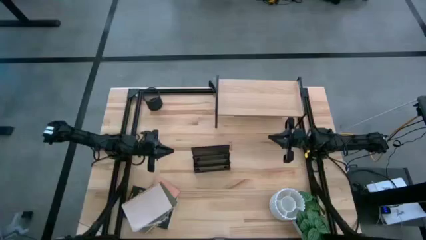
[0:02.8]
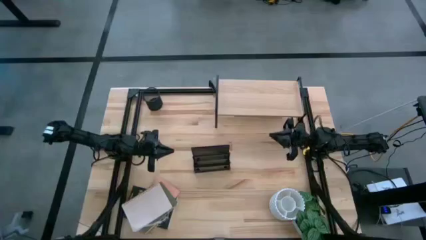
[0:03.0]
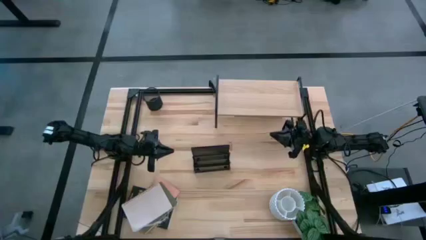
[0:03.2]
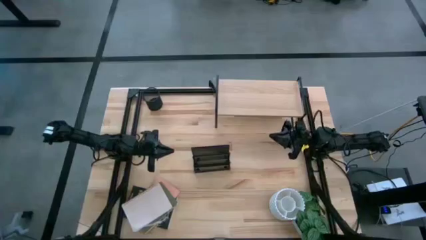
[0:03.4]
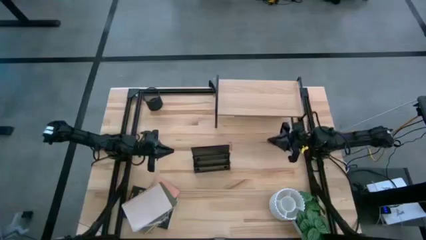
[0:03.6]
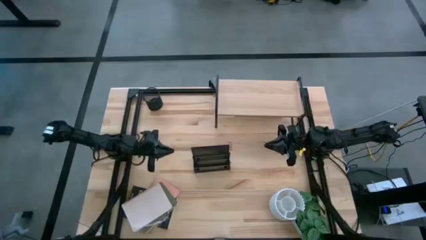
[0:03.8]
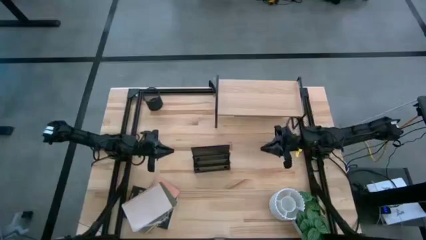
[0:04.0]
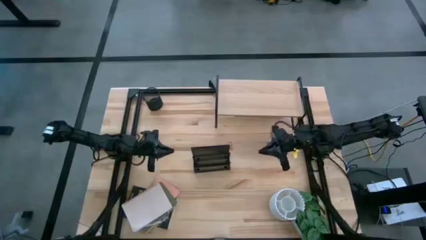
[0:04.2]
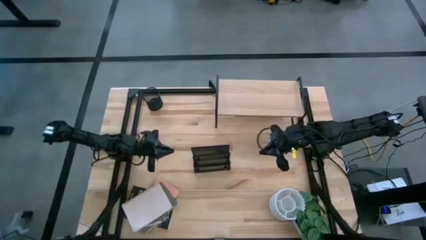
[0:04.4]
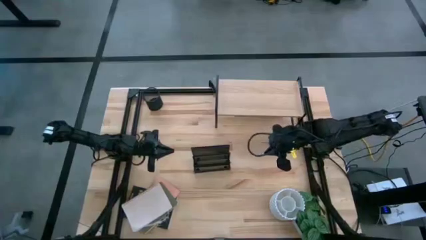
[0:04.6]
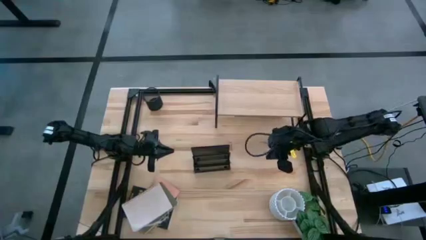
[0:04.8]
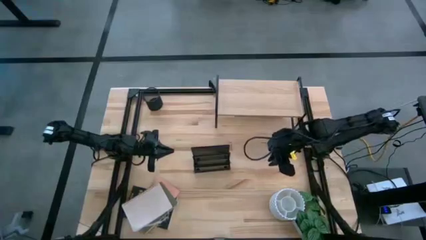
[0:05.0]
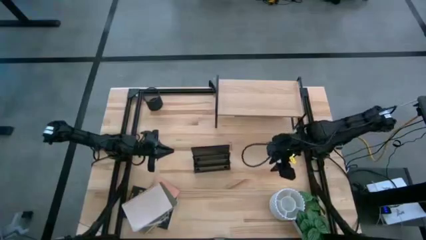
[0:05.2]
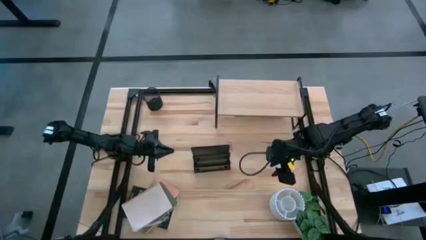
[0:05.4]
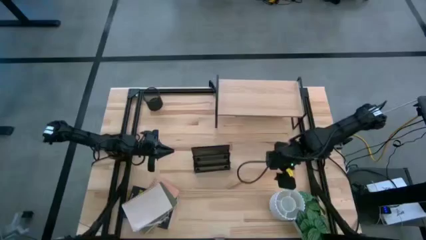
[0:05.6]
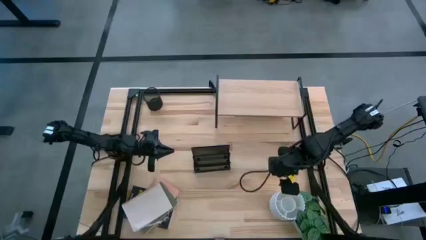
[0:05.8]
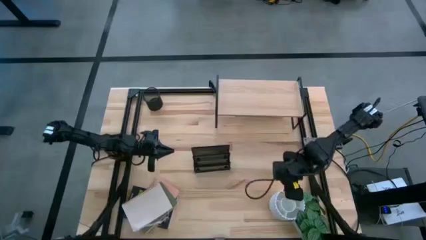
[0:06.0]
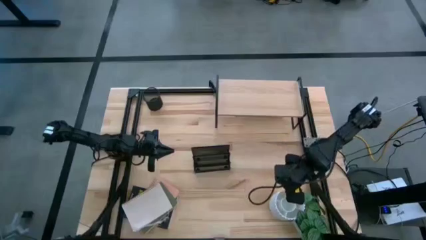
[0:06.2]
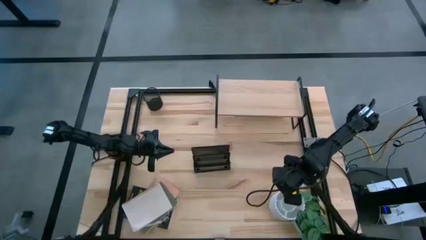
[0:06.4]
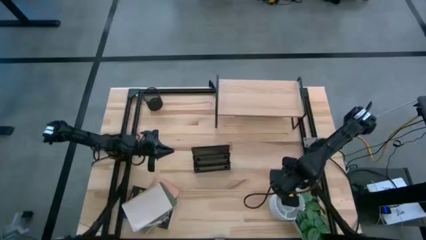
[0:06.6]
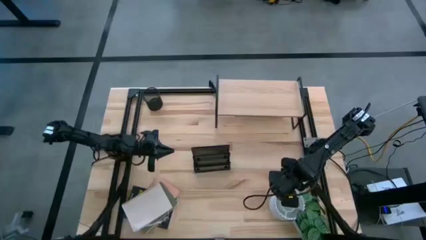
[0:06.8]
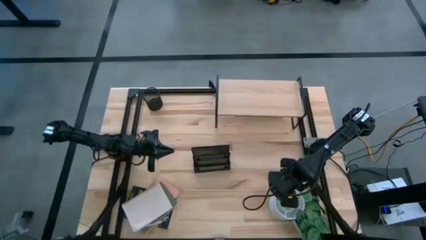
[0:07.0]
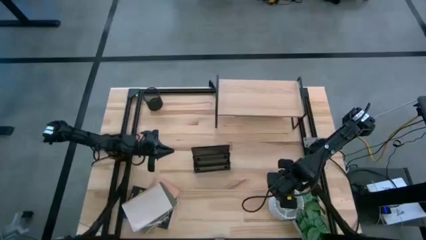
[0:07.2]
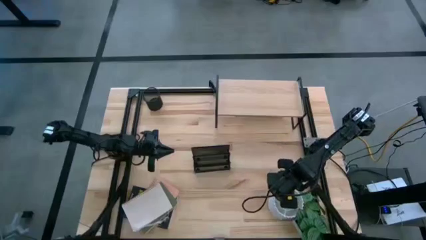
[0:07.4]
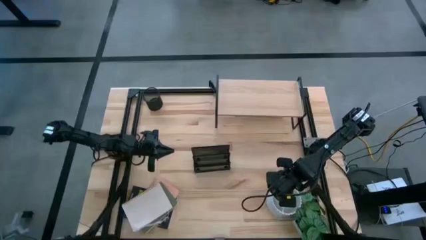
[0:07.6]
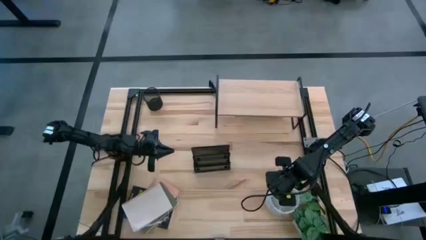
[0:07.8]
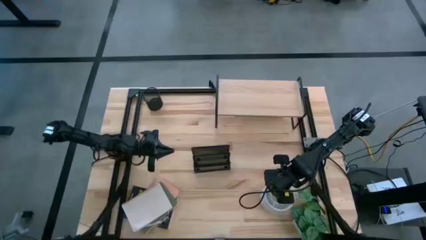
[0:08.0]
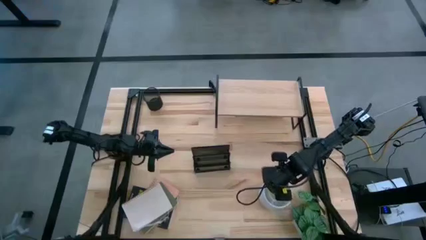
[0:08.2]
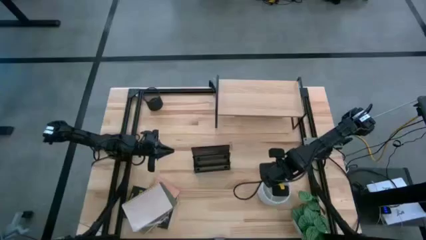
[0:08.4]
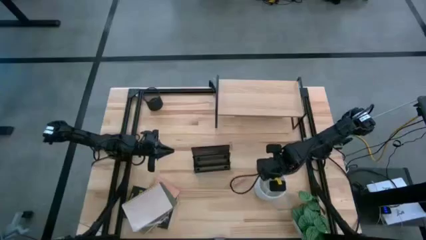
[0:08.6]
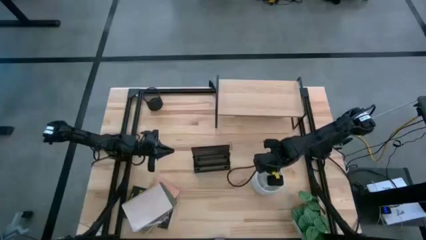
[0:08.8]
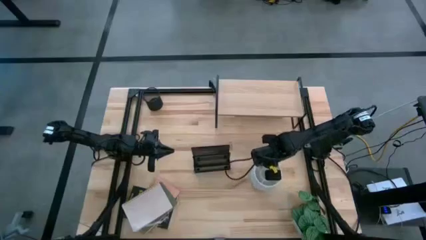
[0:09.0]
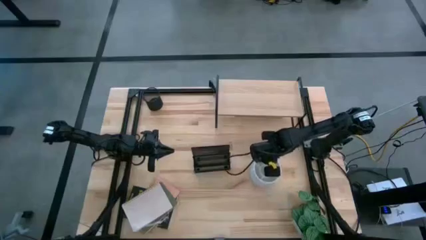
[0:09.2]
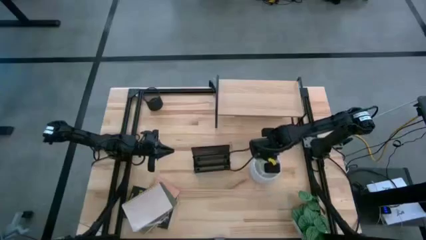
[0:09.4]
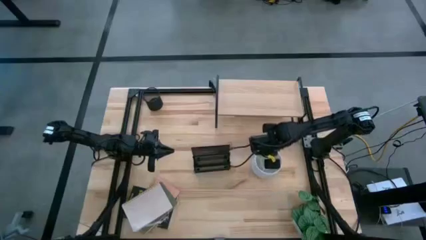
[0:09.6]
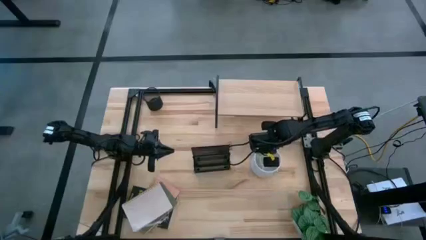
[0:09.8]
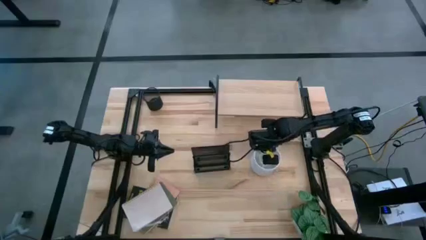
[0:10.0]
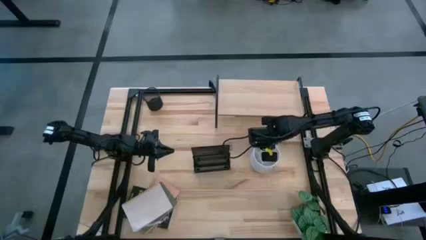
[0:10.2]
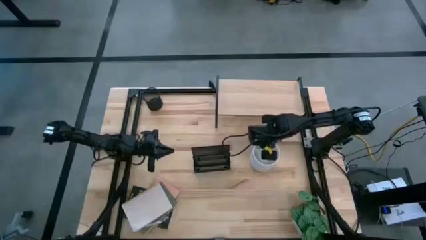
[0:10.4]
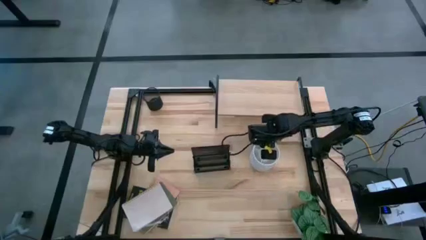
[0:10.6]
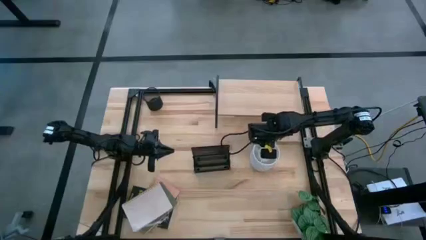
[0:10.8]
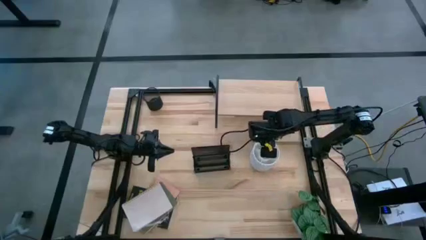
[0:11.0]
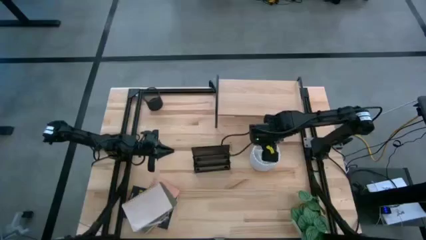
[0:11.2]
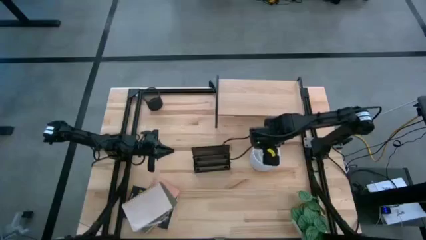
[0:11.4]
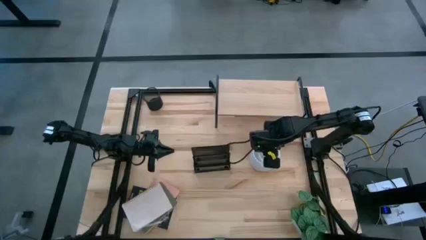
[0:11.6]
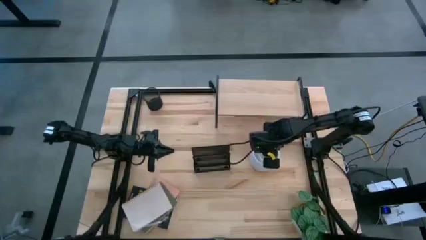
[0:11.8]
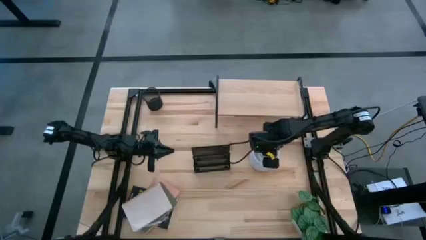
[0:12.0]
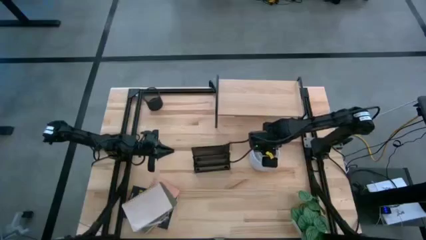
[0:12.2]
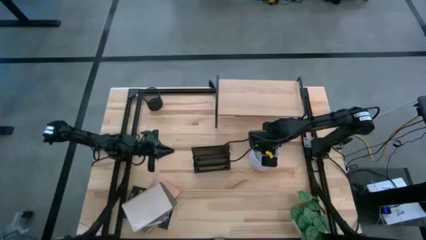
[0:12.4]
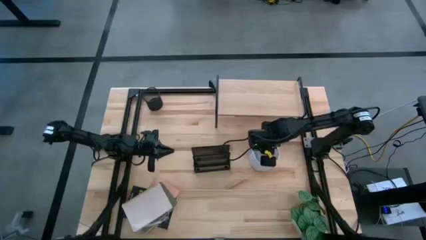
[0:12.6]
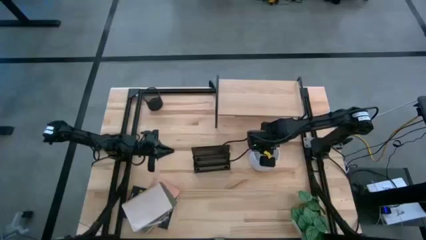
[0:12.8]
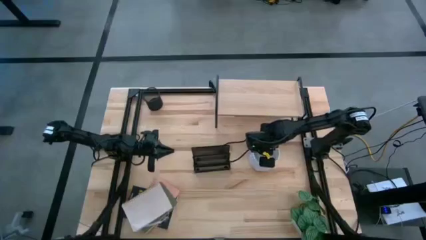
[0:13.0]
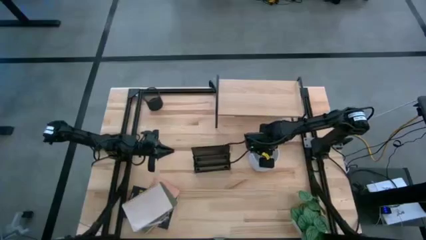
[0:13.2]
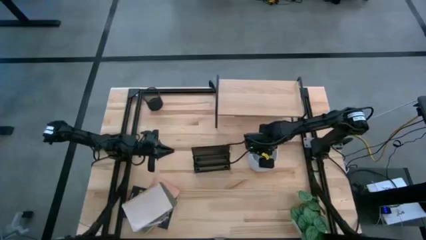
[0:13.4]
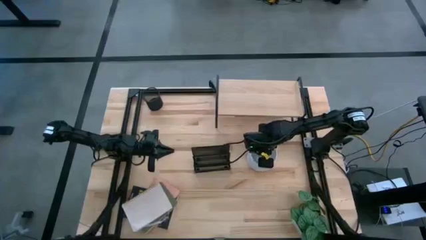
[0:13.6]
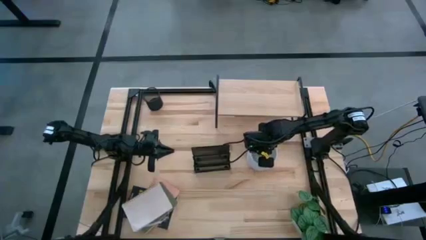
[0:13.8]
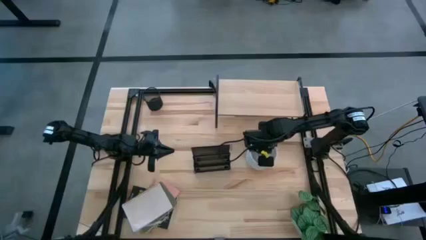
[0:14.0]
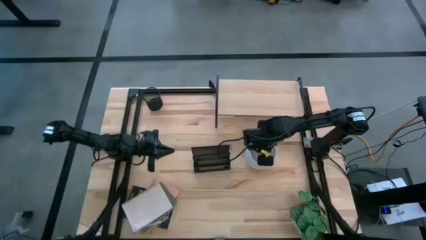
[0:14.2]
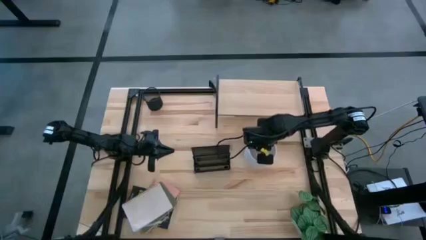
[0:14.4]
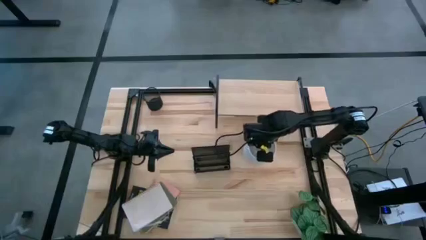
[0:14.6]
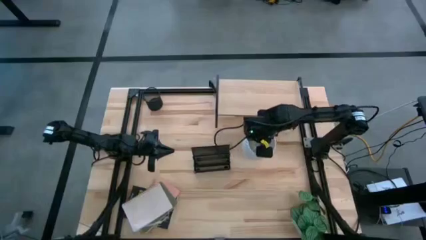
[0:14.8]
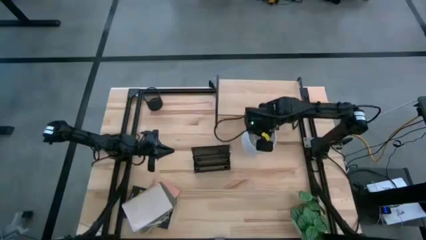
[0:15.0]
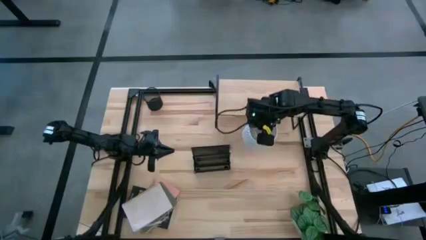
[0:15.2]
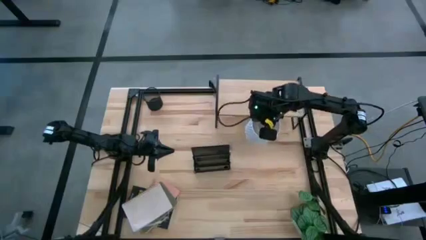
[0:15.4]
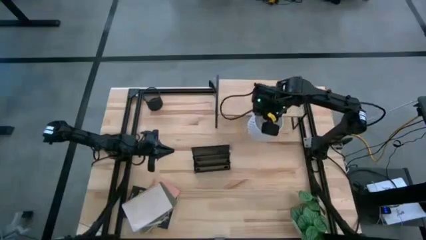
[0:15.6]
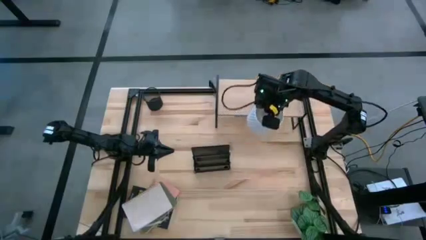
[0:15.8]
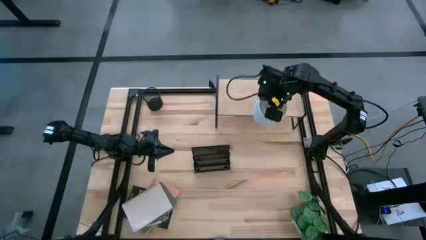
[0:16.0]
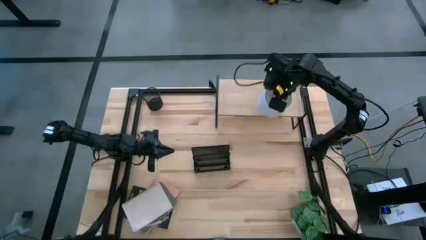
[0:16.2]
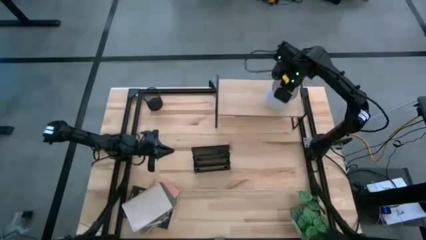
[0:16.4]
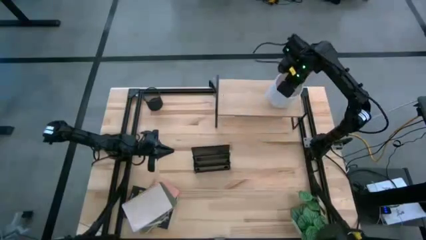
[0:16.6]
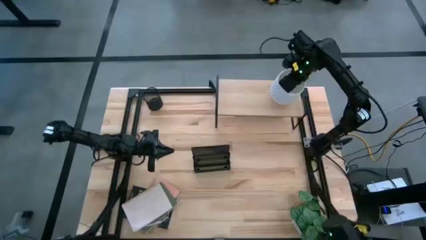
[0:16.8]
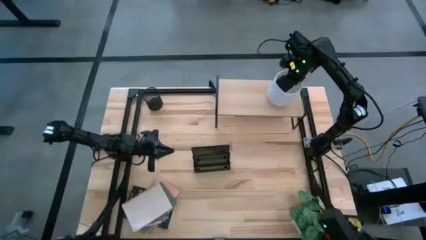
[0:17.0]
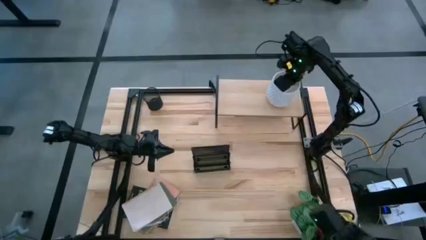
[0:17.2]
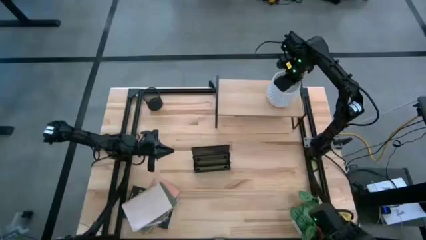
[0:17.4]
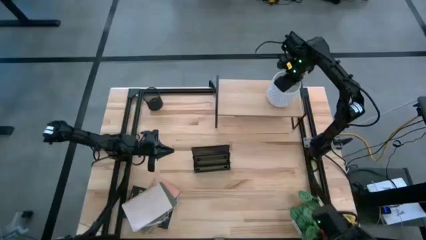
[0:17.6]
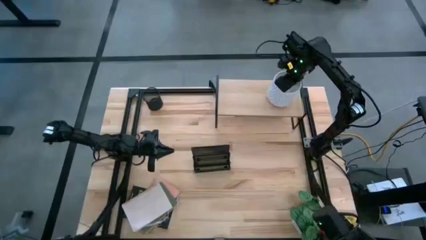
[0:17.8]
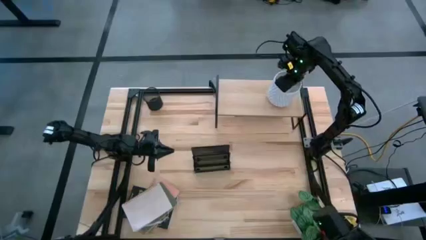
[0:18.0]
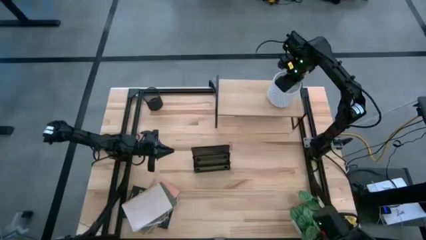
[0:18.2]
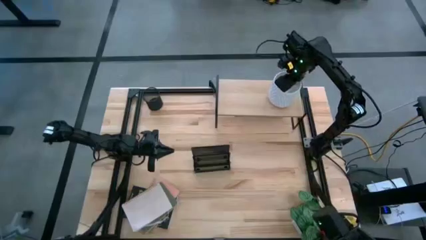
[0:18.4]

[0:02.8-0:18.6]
Task: Stock shelves
Put the white pen organizer onto the shelf
